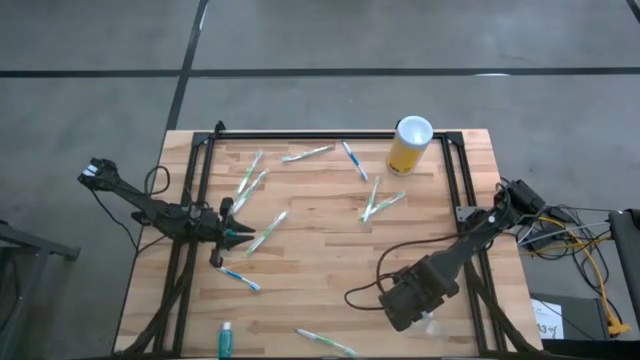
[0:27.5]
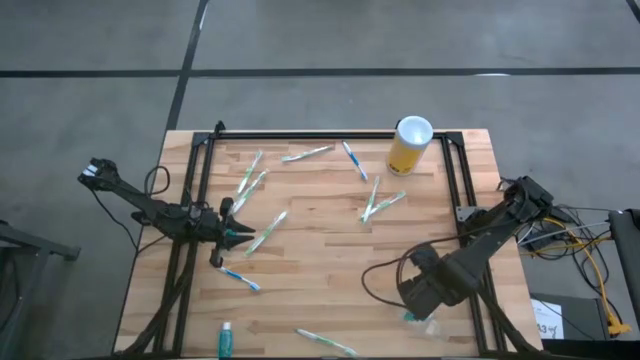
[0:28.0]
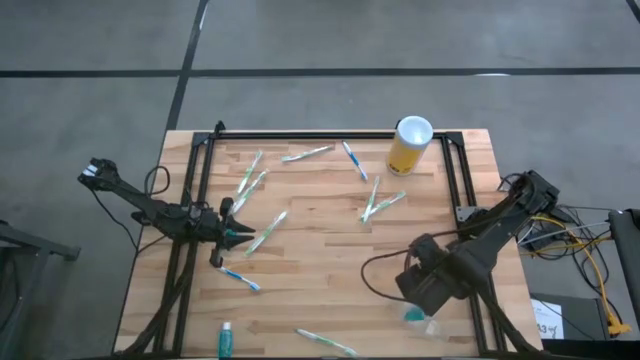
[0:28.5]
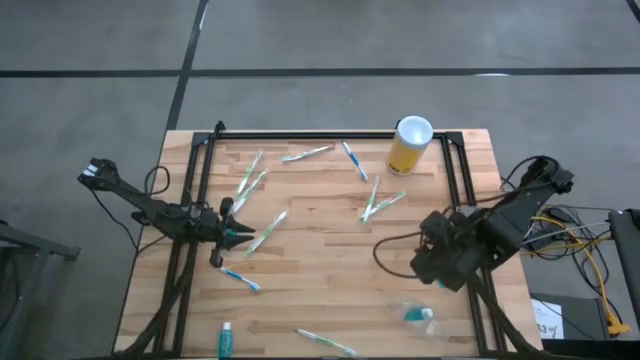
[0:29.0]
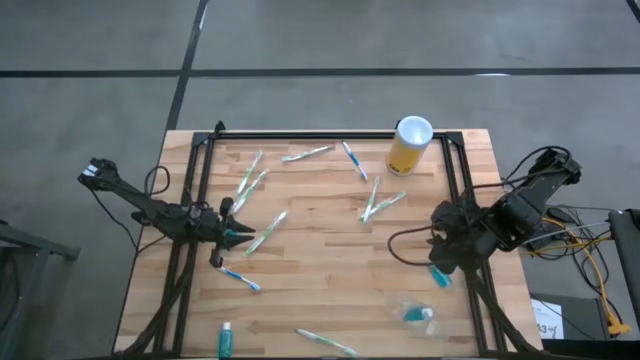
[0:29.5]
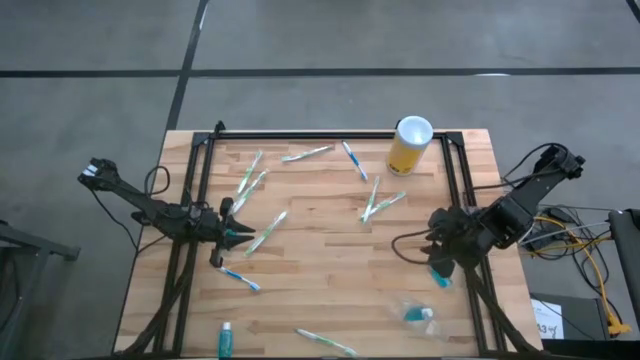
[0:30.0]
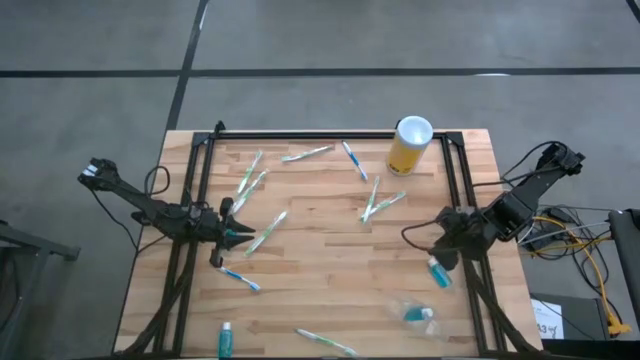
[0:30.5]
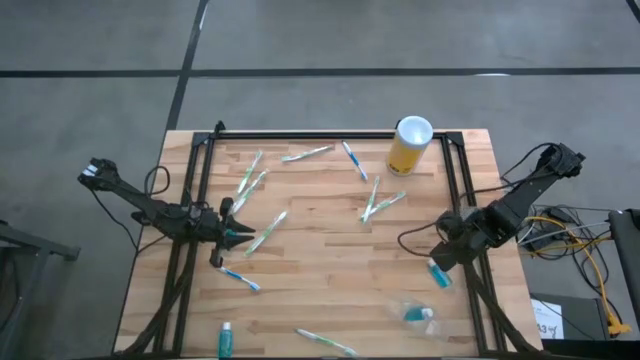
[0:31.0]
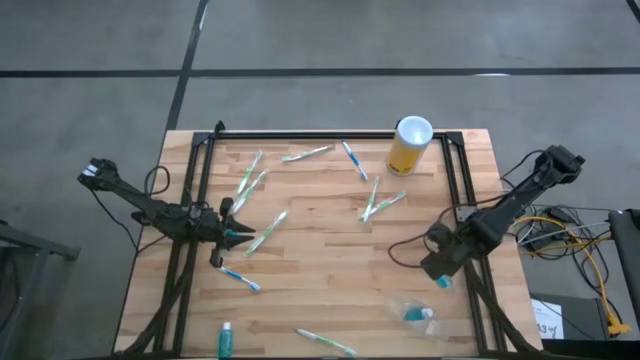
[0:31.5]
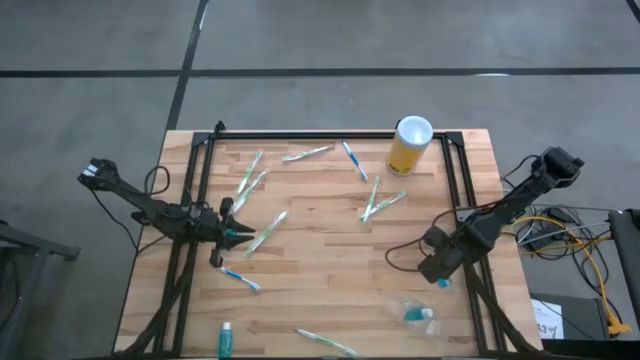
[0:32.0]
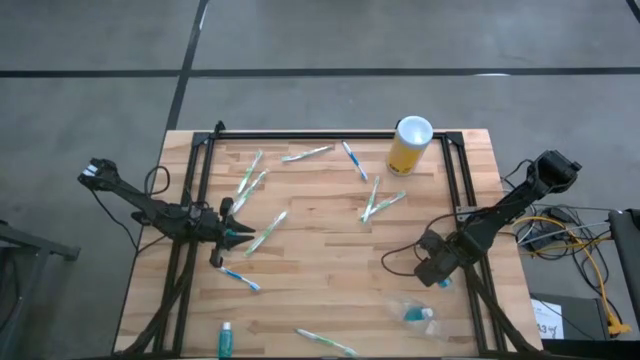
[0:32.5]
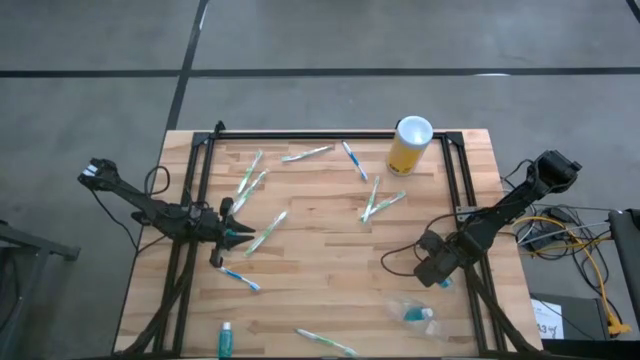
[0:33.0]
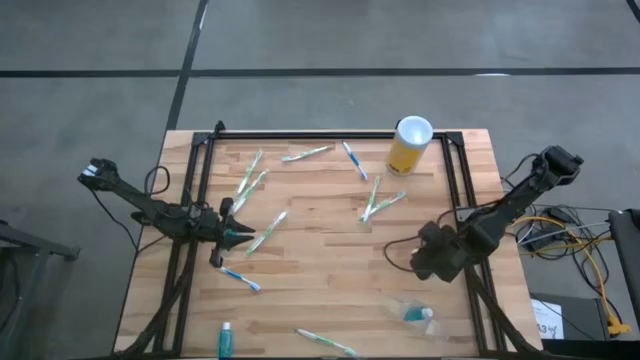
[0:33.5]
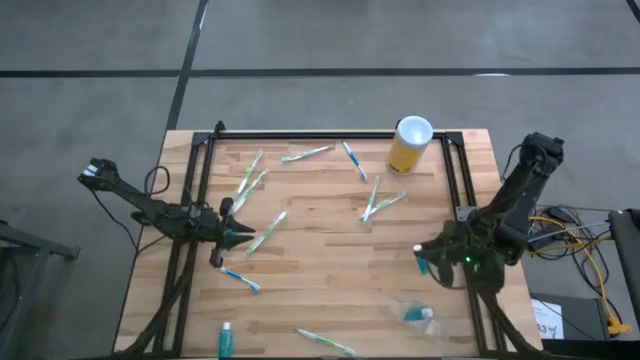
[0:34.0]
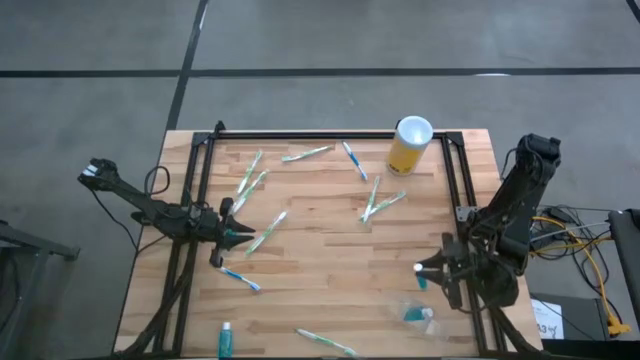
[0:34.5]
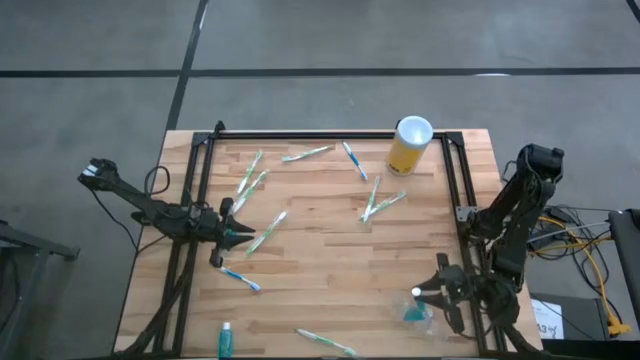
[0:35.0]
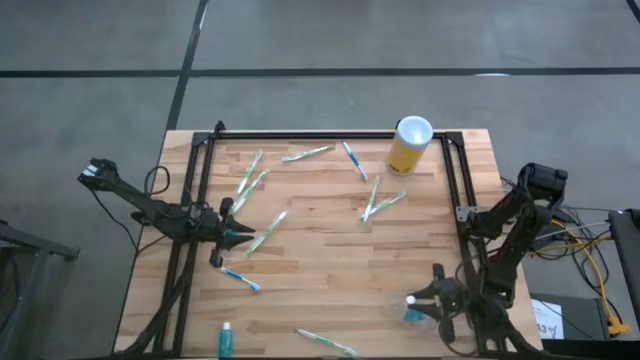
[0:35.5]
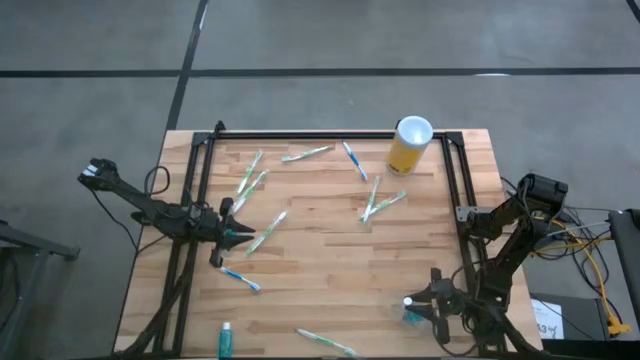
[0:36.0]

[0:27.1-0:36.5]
Task: Pick & Place toothbrushing station
Put the blue mouthwash into the transparent organizer

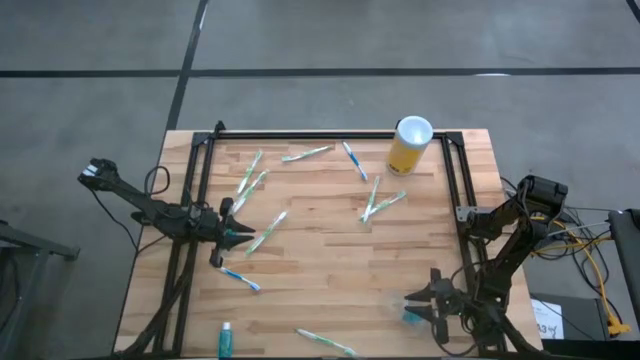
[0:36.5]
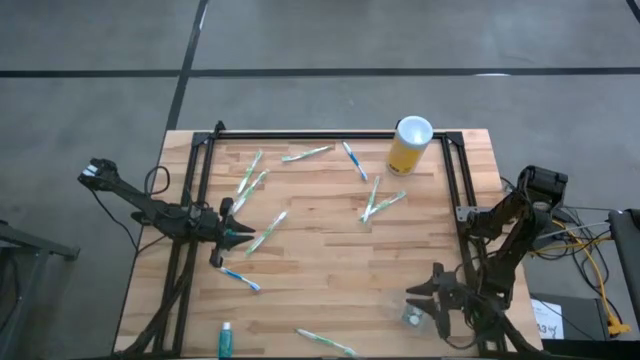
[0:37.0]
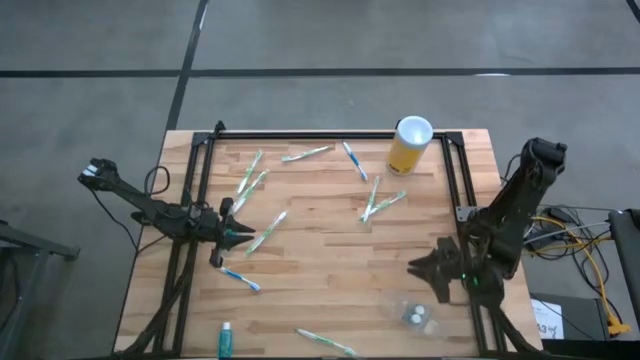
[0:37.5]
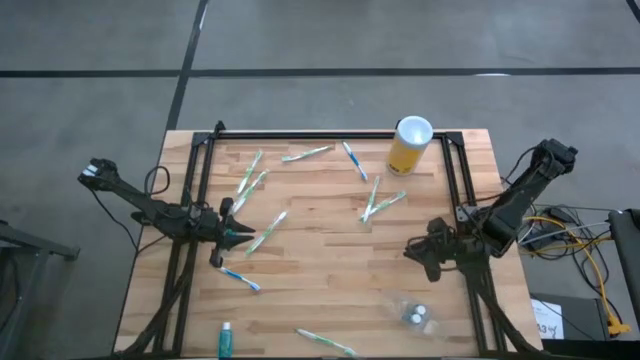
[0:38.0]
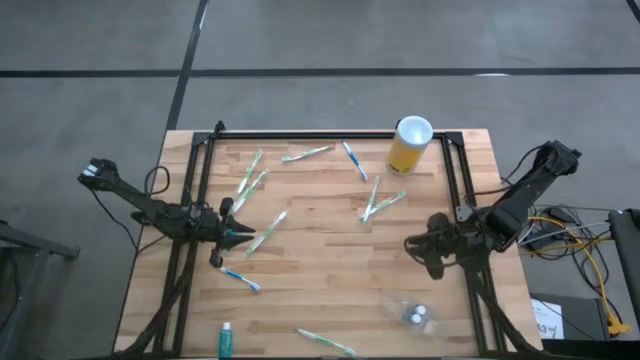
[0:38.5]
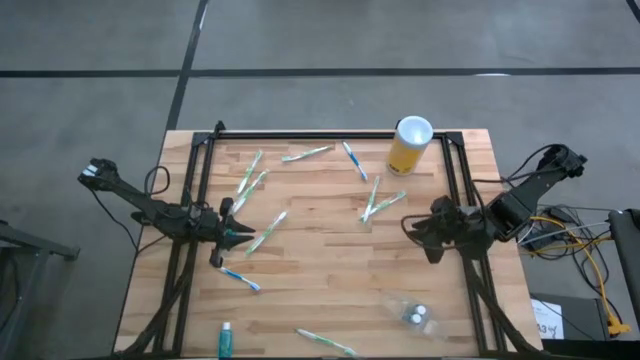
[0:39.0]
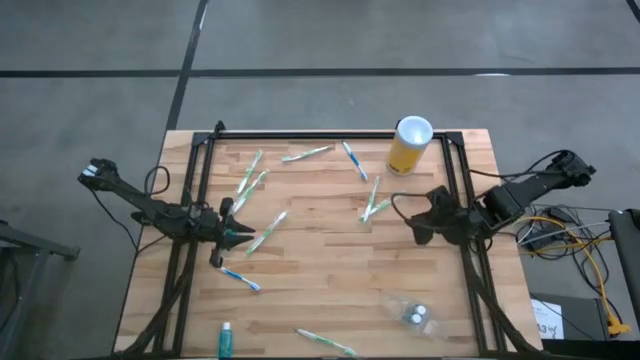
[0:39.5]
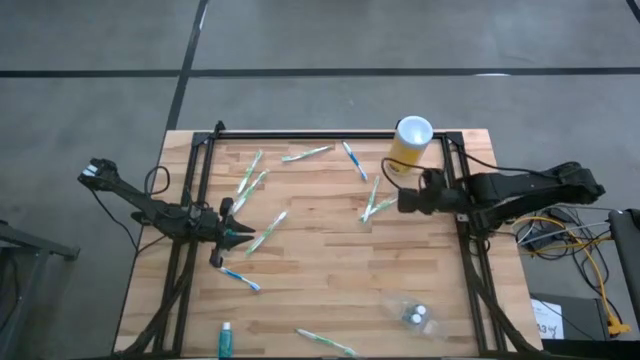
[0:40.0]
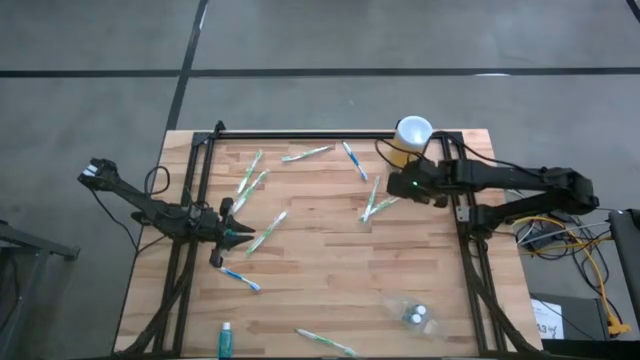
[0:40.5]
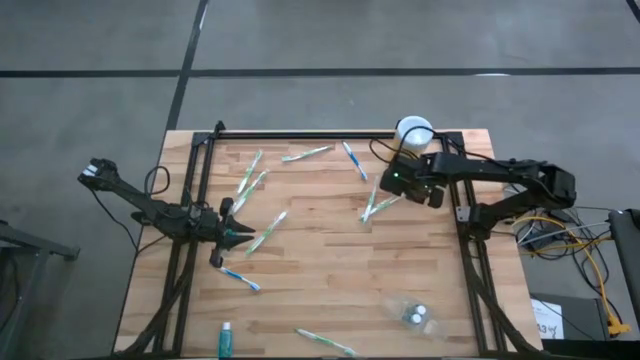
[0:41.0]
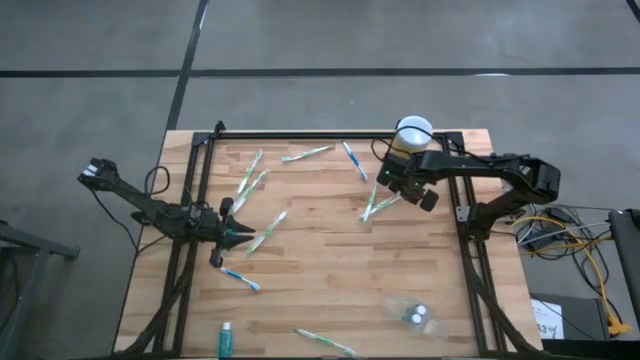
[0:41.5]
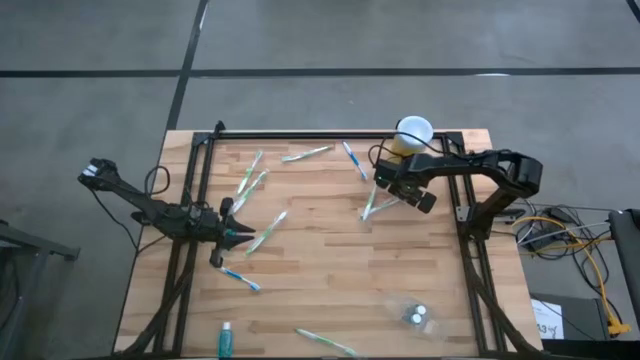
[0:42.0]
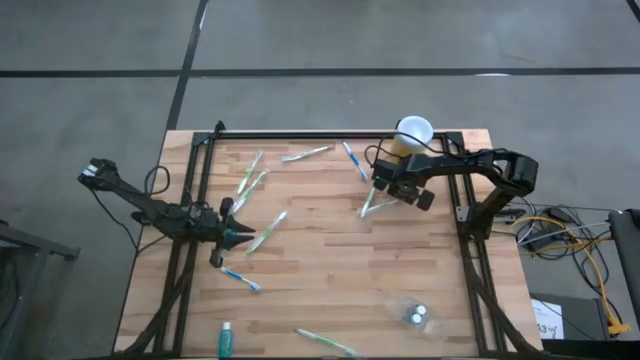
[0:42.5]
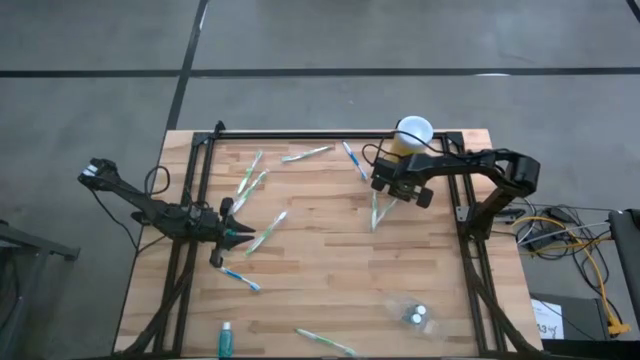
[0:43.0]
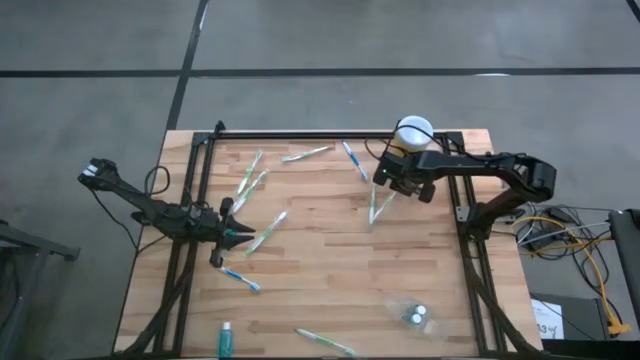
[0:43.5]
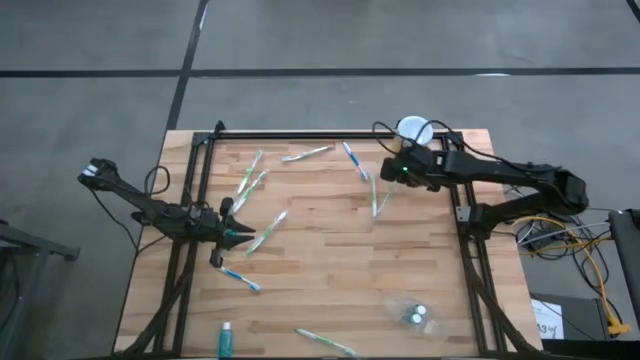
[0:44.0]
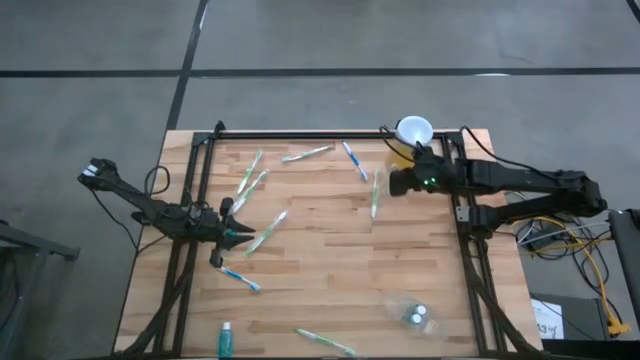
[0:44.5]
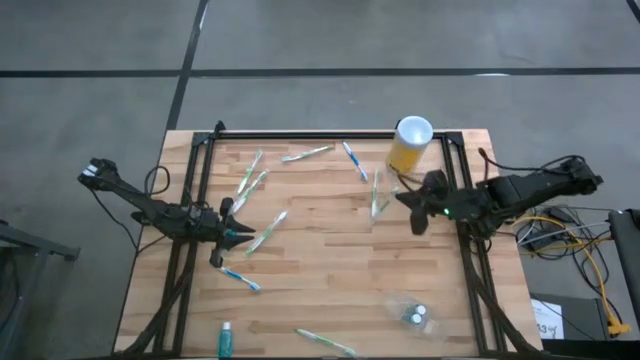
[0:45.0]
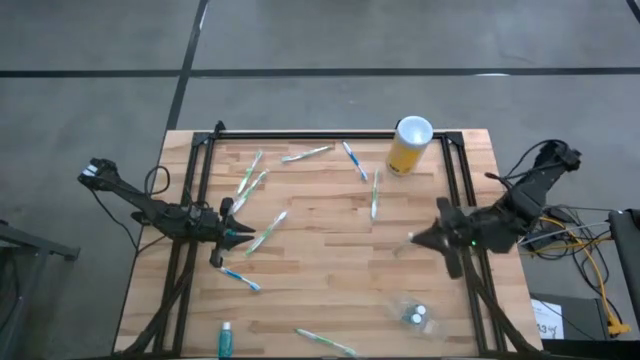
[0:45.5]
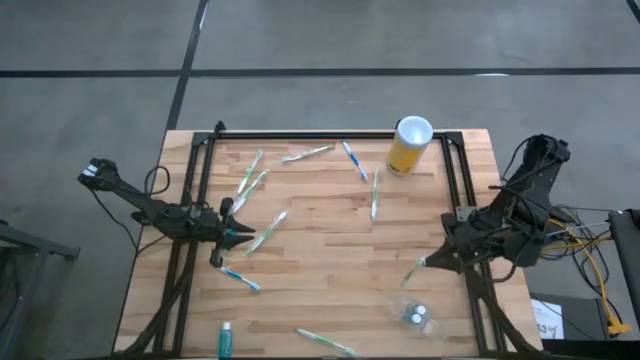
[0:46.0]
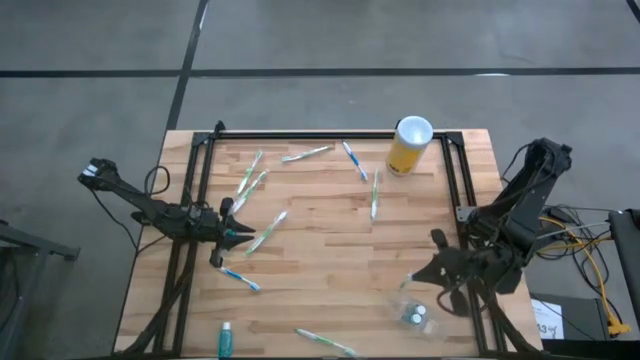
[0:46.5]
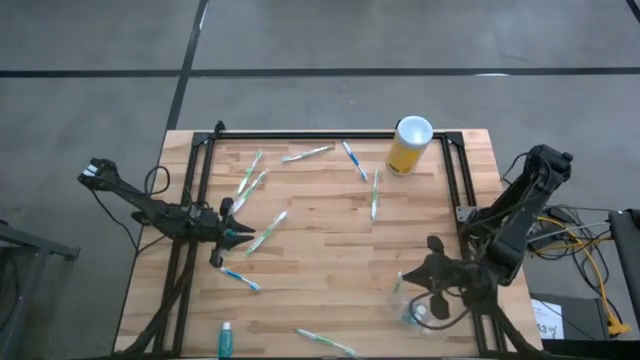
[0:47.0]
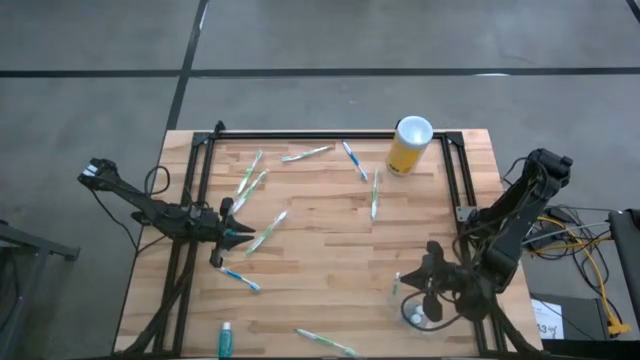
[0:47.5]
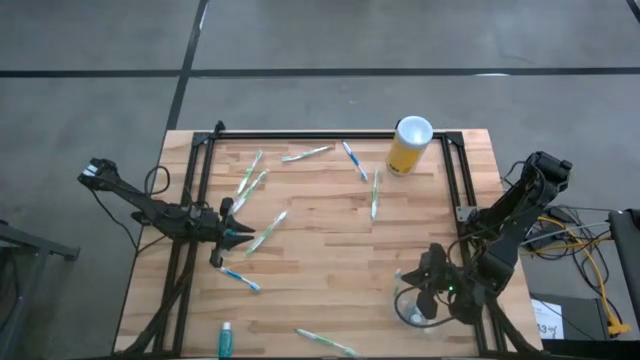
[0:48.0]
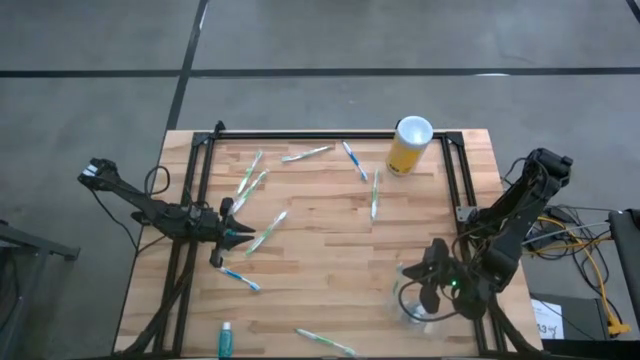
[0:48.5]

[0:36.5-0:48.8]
Put the green toothbrush into the transparent organizer
